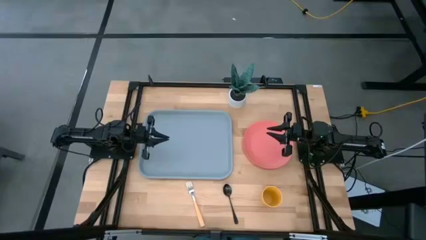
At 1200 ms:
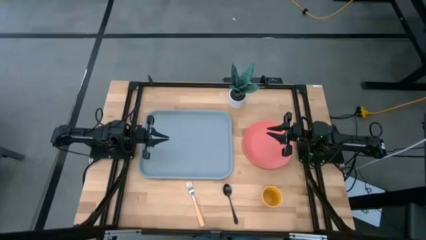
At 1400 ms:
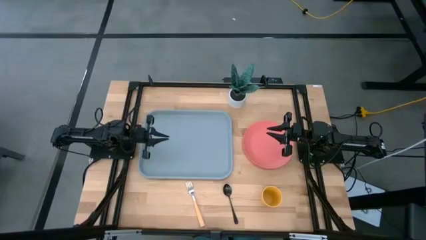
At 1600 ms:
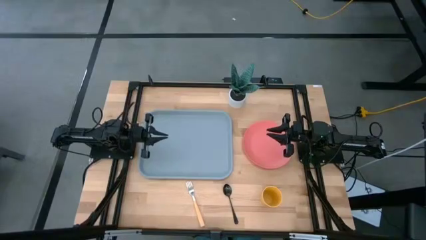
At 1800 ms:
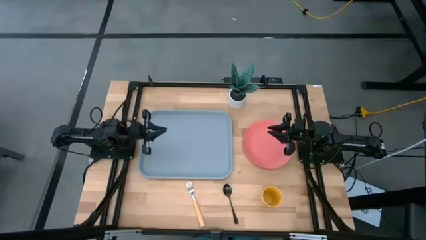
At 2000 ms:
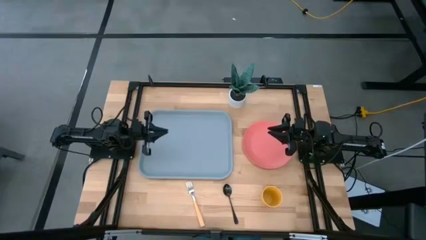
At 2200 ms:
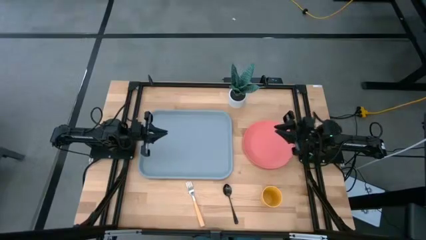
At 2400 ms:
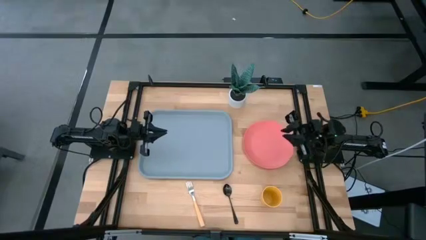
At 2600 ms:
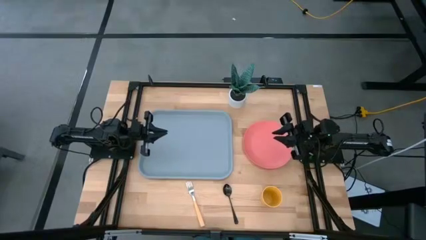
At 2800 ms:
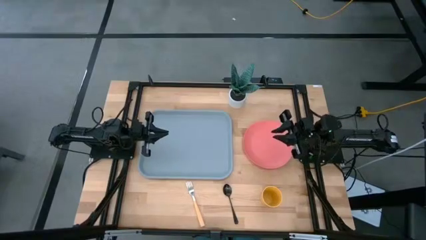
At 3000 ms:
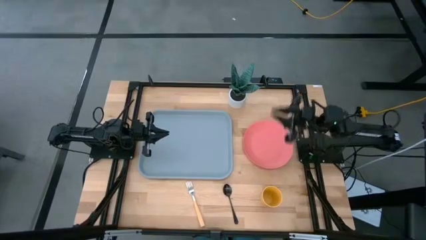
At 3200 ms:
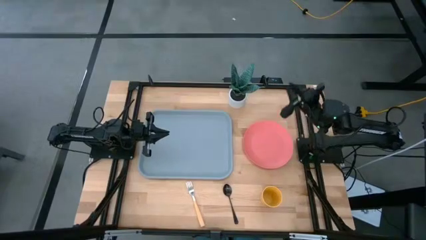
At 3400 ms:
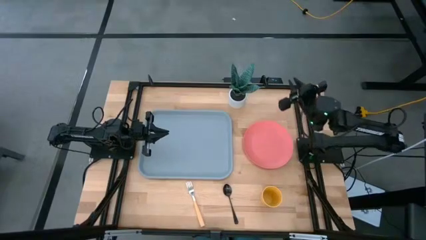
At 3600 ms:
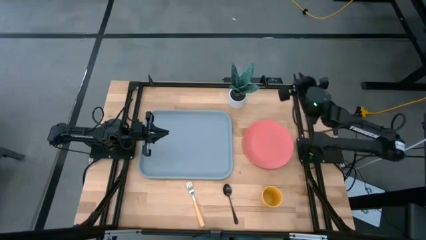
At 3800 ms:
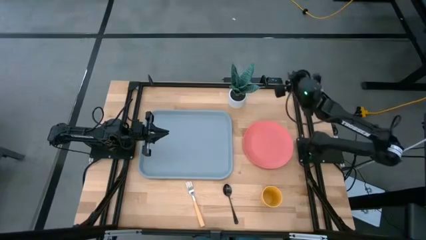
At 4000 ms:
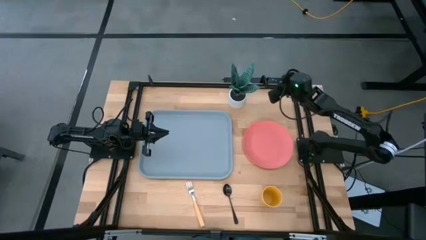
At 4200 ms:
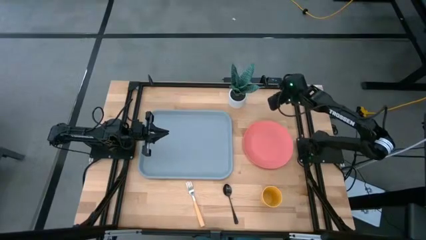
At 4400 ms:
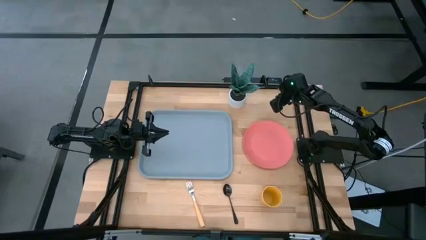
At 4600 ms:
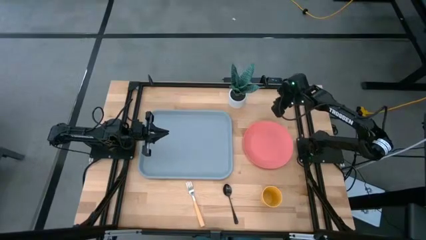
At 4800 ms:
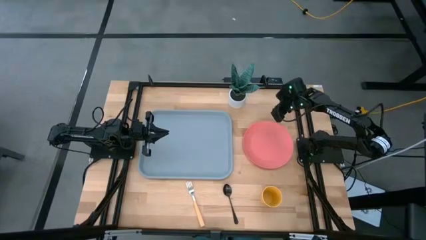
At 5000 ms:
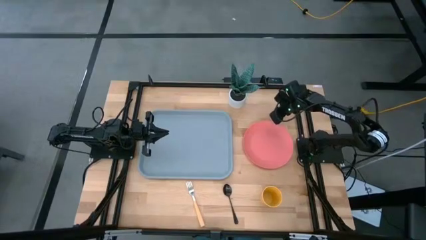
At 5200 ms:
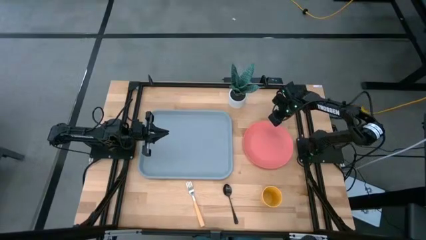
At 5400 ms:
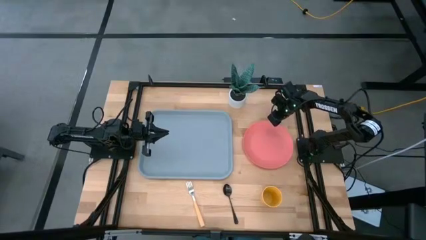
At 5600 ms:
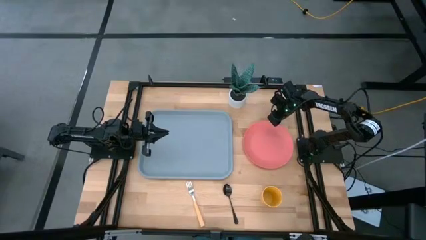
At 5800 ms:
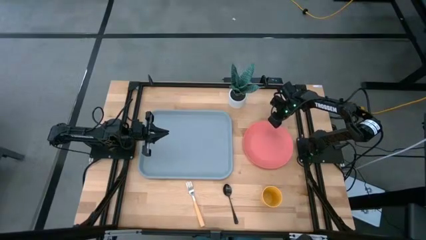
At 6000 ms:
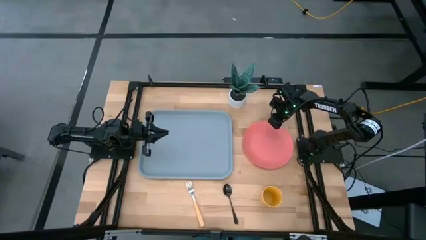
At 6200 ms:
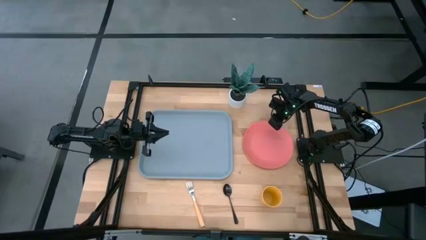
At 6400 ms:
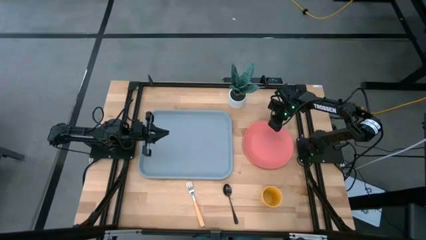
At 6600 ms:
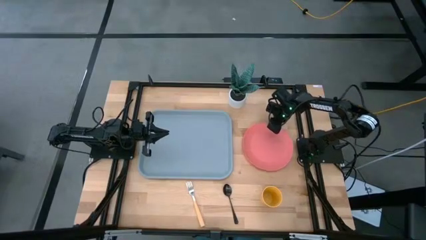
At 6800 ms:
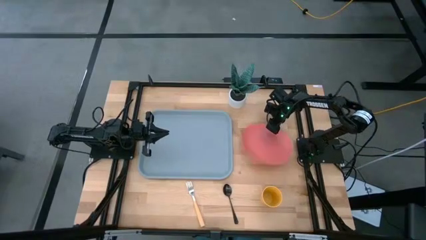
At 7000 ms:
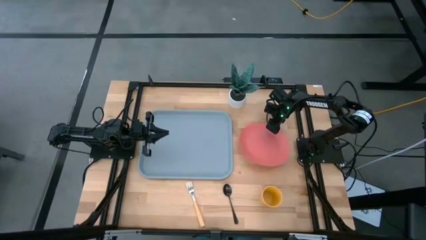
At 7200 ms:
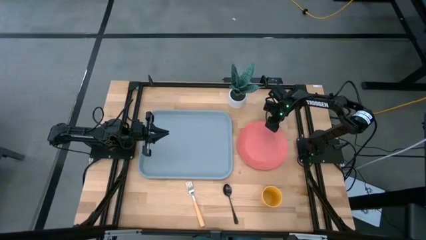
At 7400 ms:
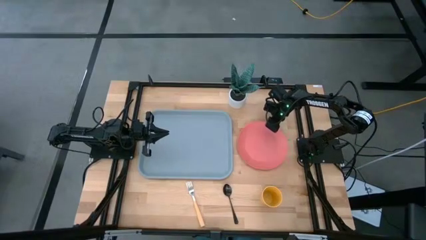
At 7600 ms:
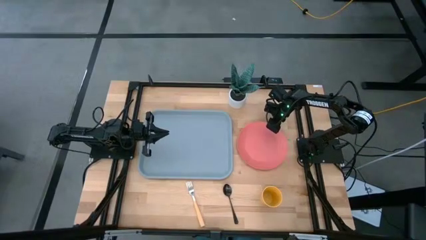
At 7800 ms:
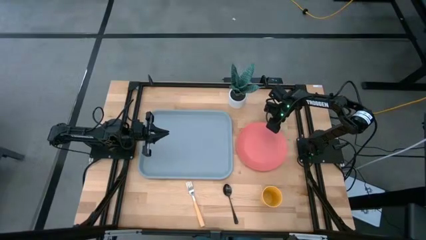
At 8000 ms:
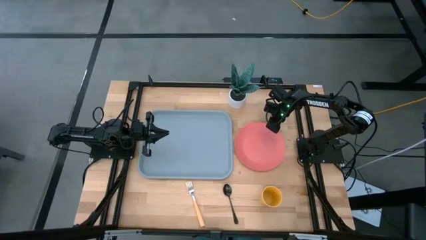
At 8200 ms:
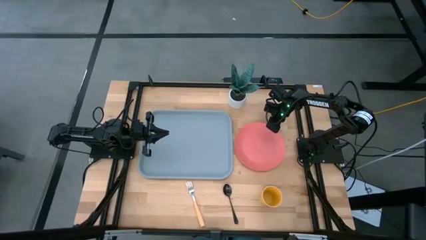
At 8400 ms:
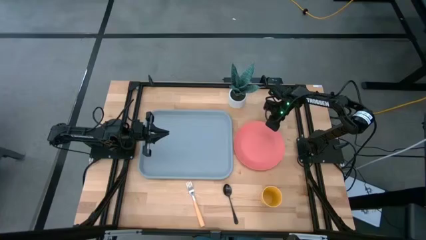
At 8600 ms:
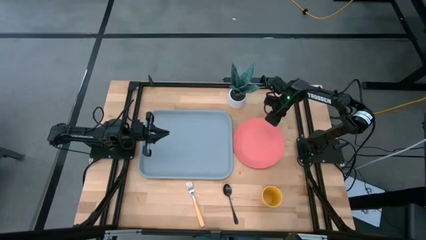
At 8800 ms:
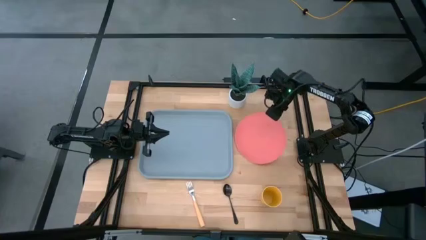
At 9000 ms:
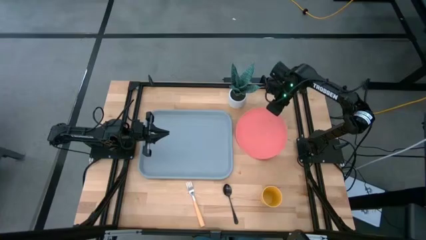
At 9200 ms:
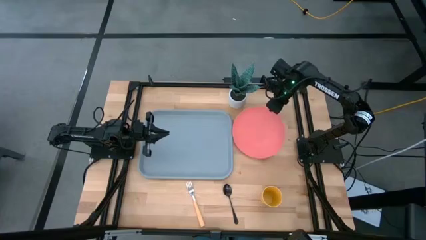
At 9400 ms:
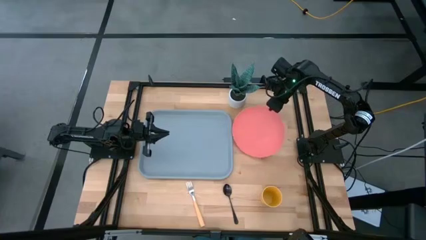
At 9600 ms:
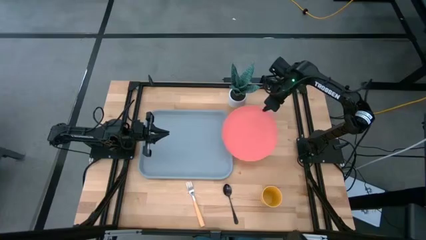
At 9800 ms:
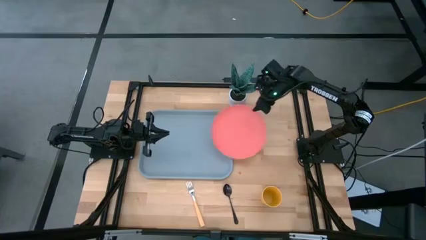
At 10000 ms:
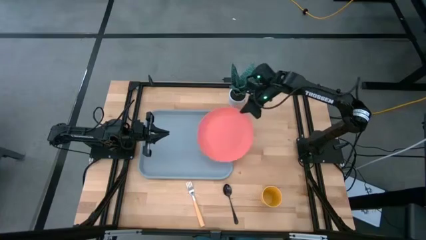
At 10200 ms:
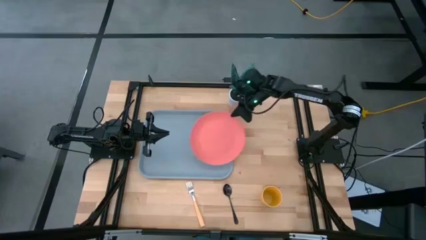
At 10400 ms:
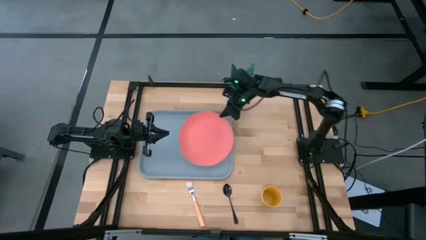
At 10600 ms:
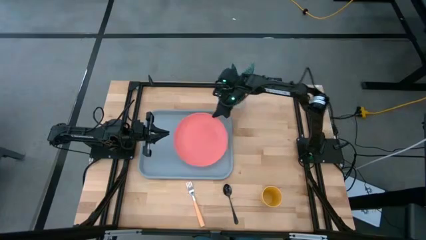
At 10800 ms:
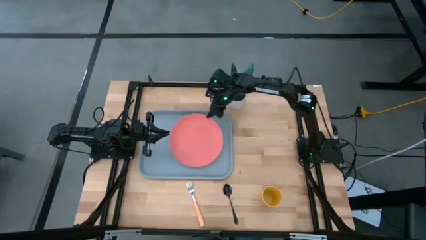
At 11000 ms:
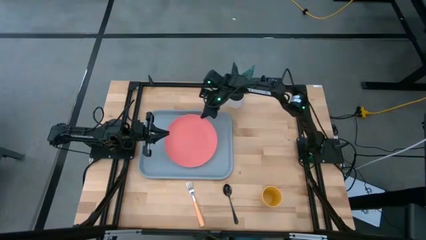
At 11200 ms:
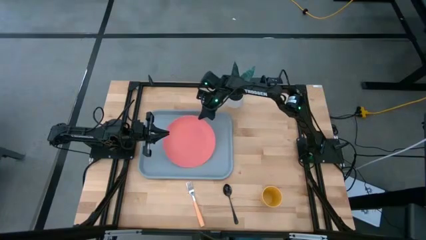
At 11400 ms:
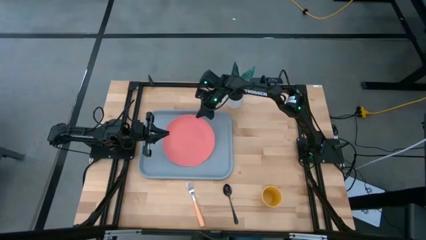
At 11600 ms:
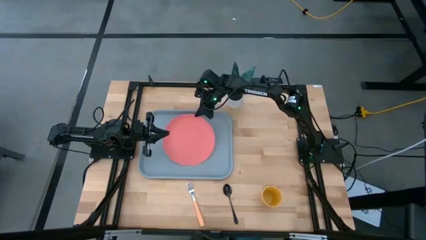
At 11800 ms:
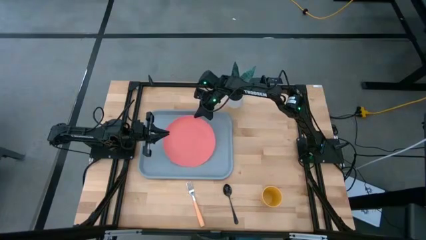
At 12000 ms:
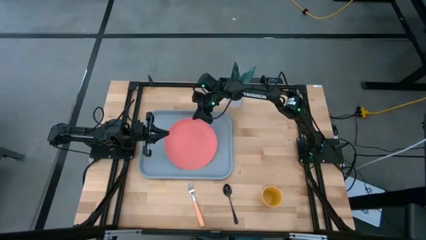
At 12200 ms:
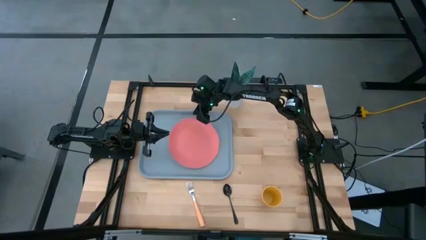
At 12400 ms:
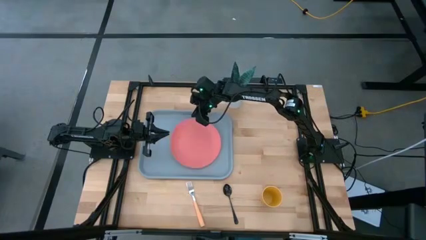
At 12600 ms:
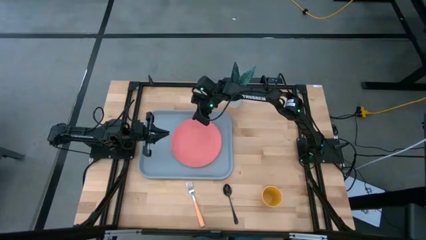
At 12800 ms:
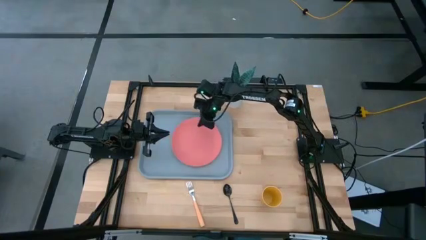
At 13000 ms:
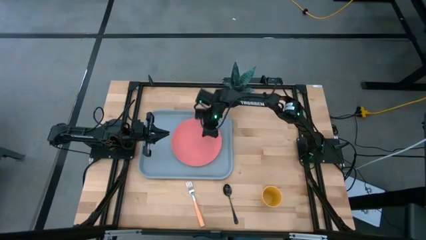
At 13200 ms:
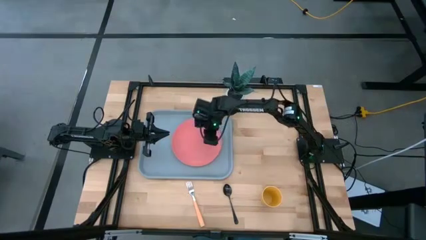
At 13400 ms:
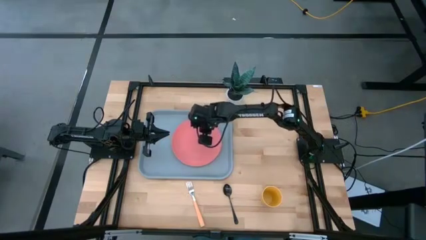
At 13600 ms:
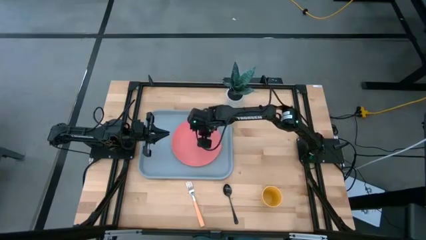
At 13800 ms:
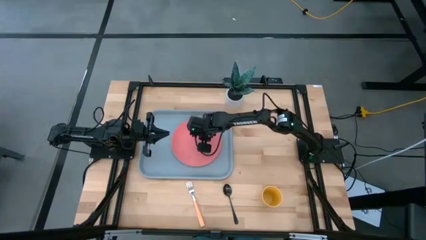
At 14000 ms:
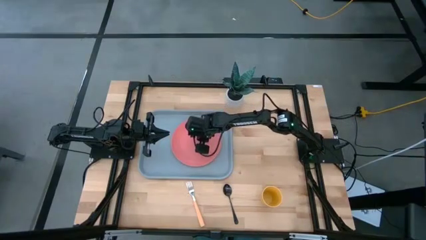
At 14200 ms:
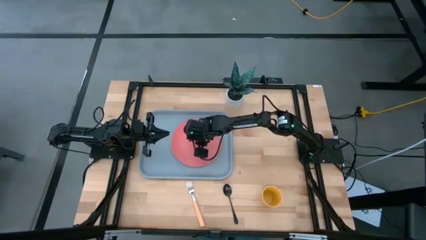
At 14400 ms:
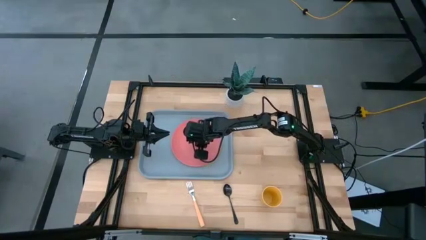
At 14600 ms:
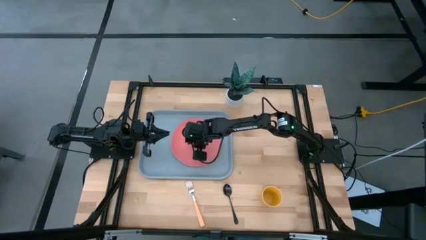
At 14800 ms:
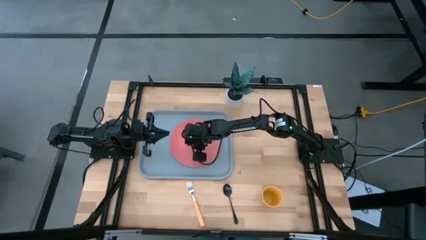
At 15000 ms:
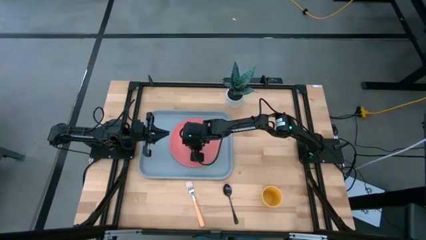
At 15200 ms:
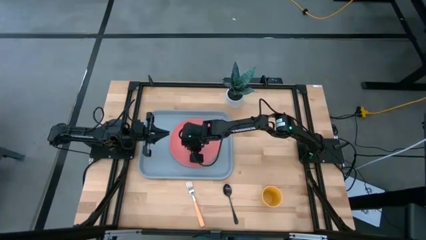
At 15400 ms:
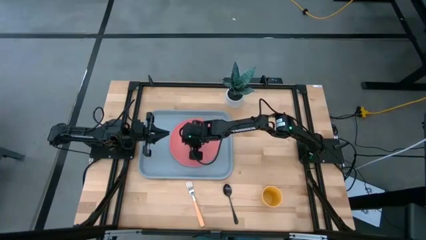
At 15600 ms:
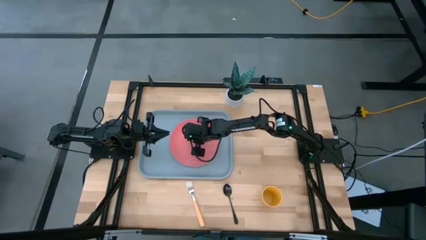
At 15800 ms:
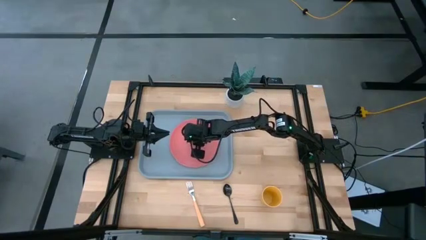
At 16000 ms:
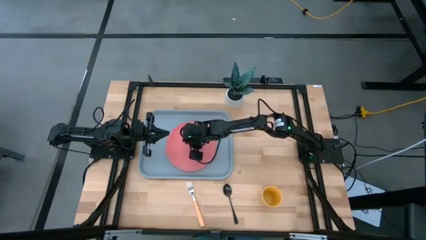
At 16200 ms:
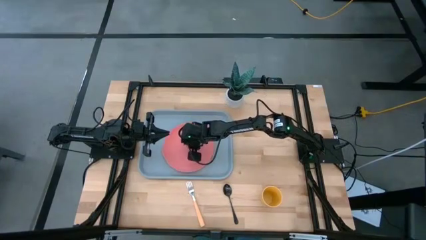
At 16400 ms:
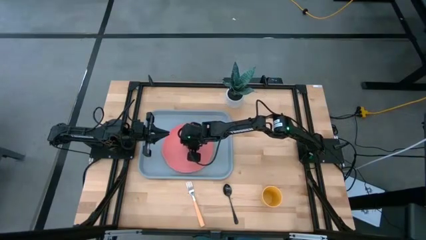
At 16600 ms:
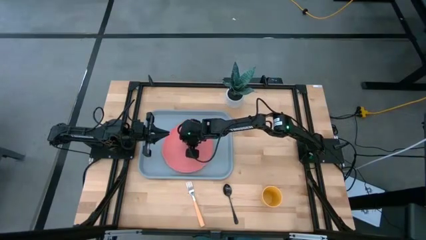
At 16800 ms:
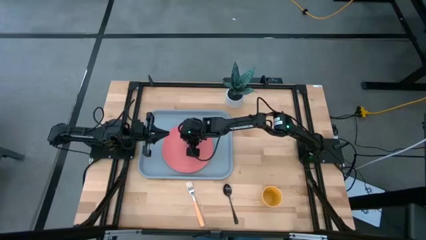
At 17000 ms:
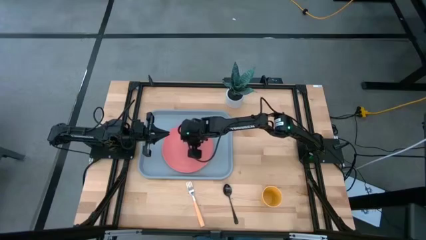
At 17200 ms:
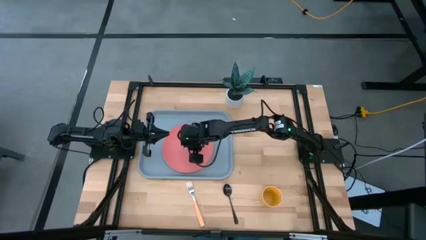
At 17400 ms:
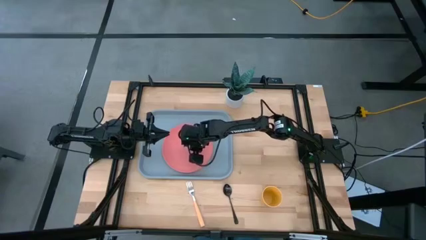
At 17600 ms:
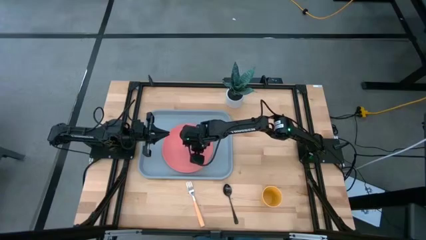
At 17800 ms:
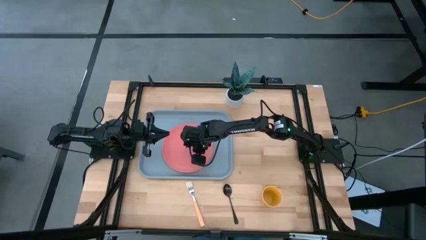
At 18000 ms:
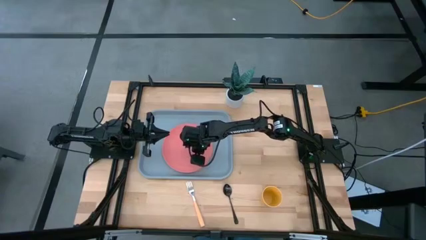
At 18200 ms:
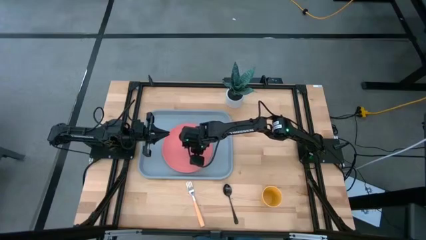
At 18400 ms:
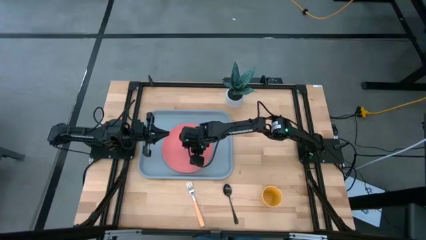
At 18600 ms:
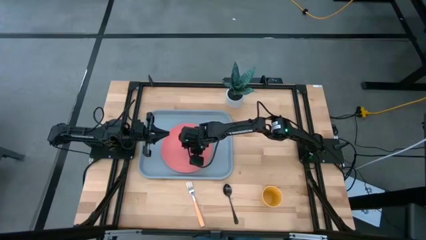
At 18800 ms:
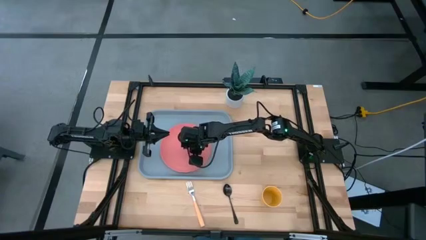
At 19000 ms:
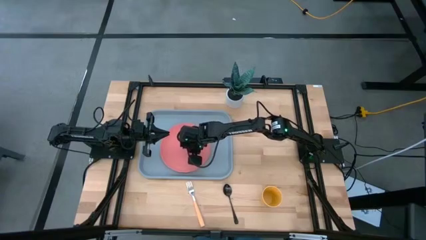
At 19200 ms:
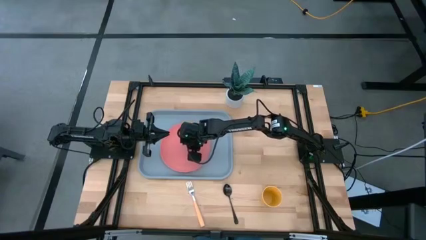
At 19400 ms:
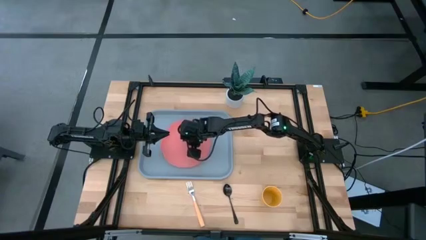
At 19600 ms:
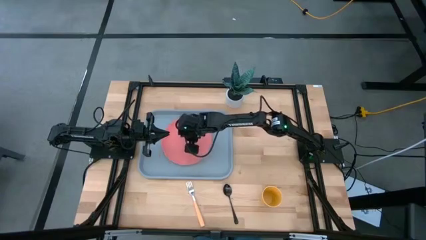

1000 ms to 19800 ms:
Task: Pick and place plate/cup/fork/spoon on tray
Put the pink plate on the gray tray
